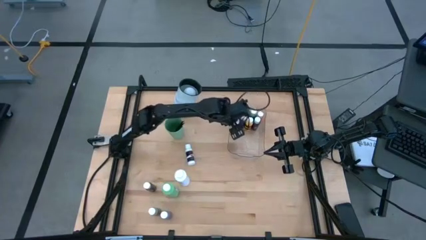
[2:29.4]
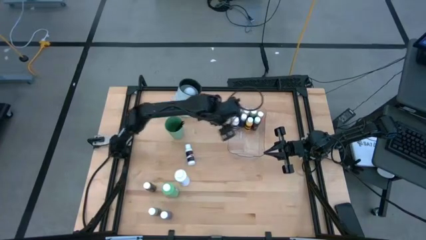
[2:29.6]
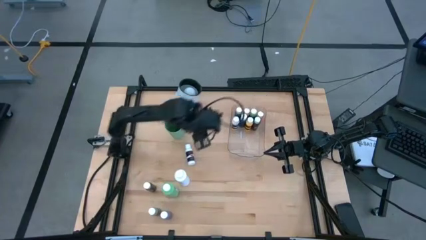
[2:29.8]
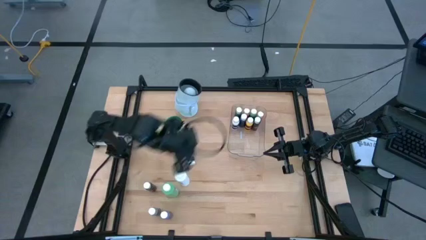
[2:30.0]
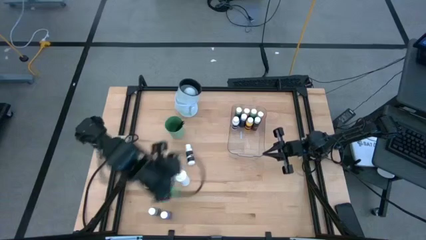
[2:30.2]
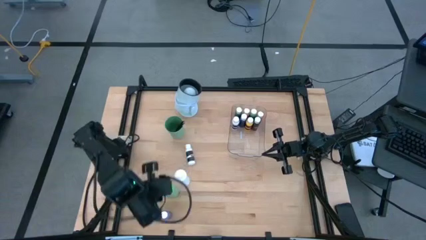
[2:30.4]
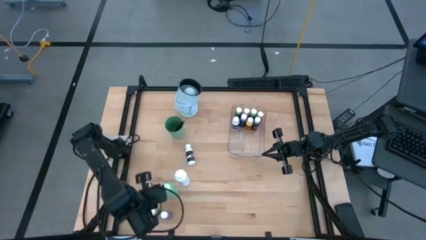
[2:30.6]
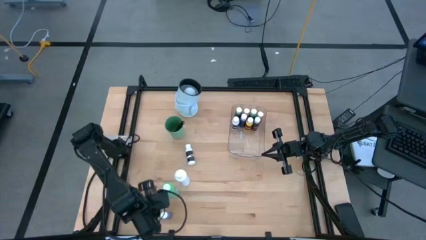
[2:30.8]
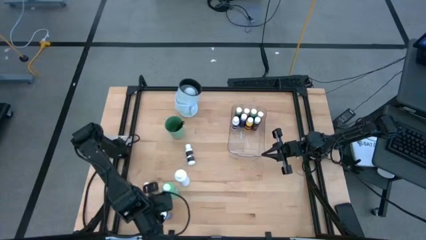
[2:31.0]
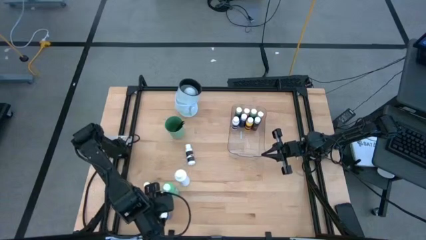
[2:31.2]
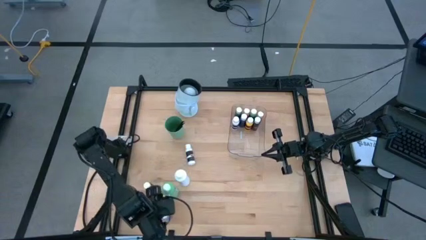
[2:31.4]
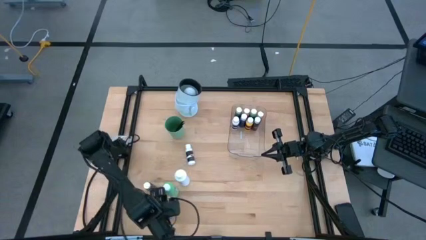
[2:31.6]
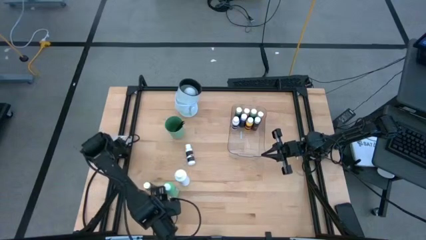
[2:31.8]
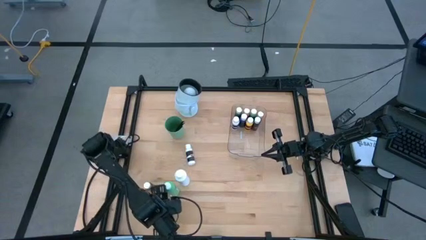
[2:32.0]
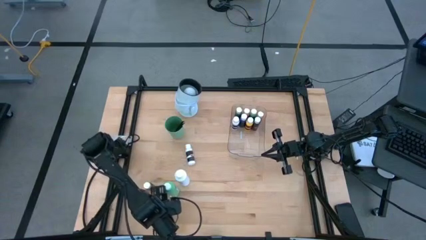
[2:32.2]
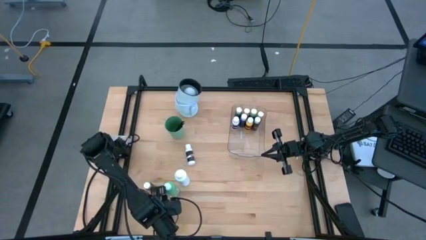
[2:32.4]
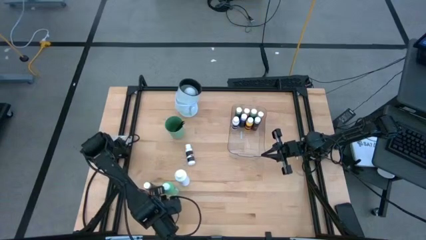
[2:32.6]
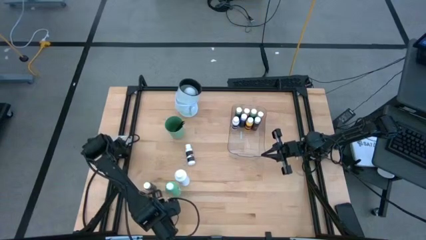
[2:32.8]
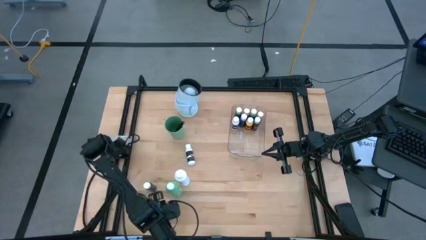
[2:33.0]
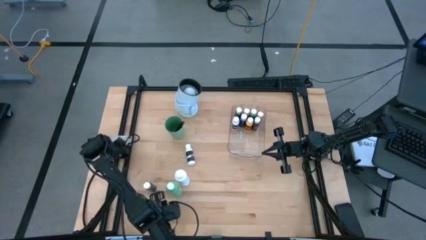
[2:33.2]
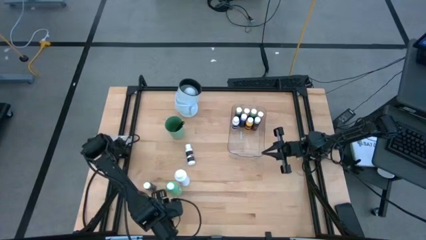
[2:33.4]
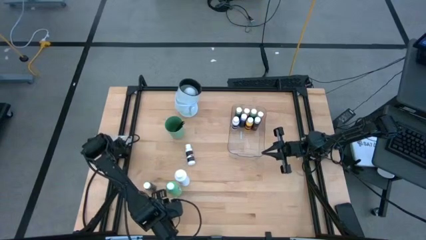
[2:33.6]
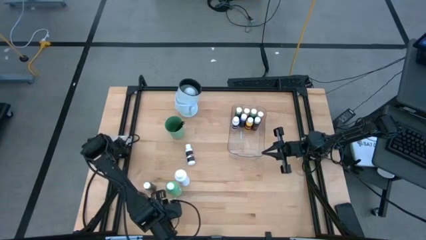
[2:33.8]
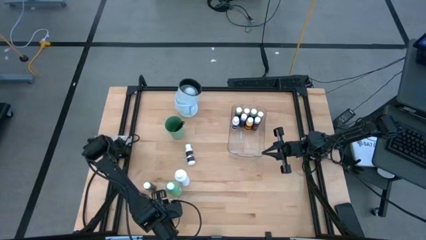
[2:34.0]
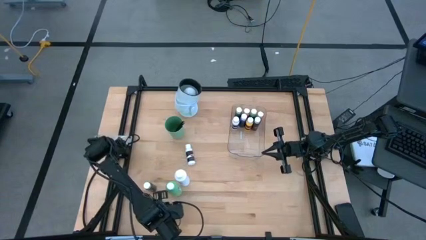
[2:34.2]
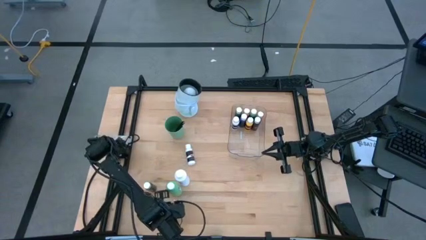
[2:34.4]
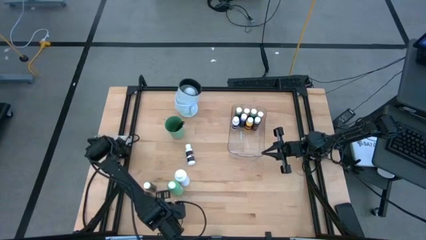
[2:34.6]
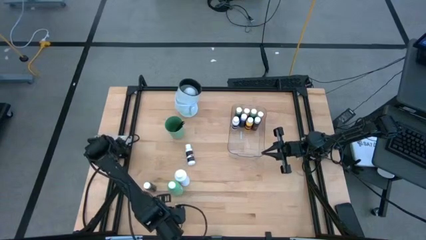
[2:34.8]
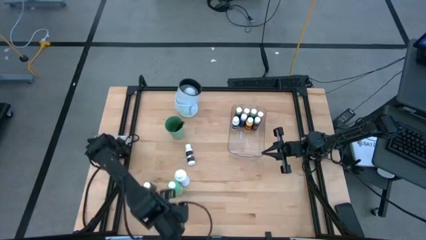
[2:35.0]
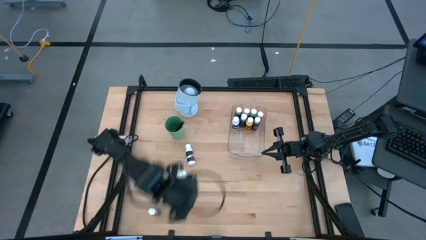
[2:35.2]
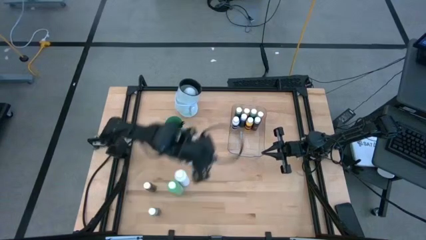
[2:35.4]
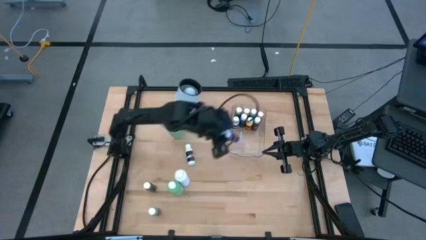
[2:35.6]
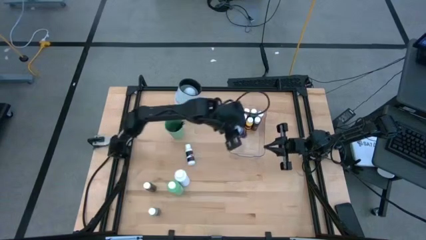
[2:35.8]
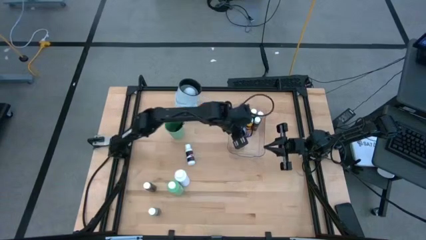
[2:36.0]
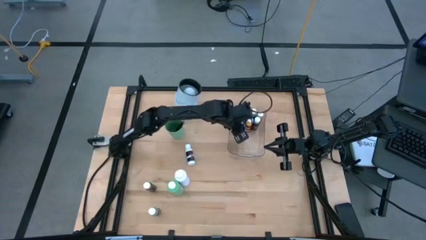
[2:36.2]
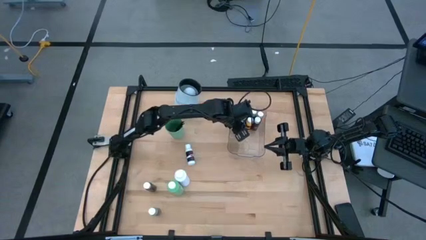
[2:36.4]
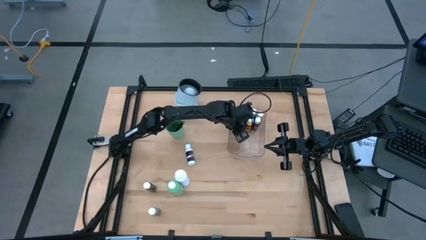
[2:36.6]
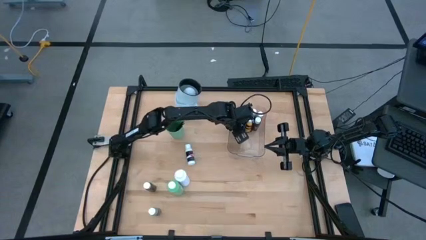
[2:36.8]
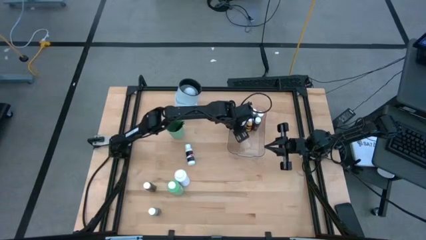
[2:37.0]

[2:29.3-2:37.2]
Task: Pick & Place Paint Supplies
Put the purple paint bottle into the transparent bin

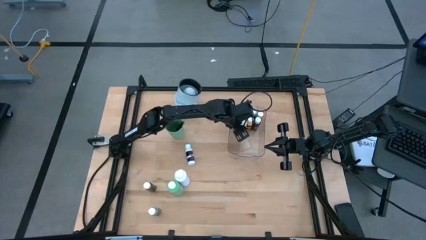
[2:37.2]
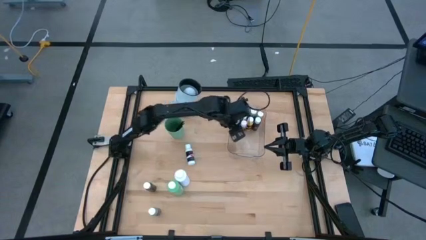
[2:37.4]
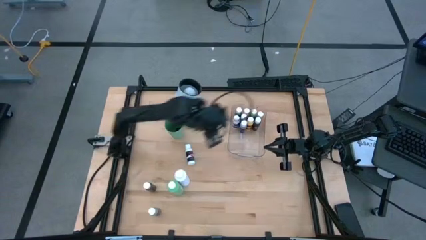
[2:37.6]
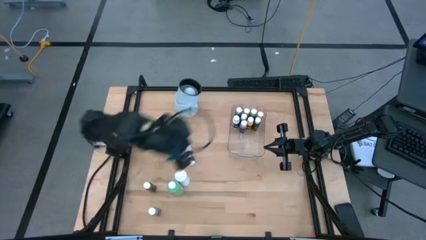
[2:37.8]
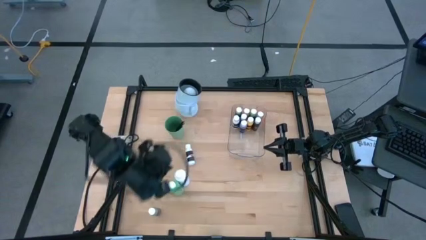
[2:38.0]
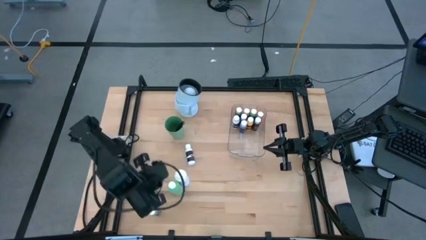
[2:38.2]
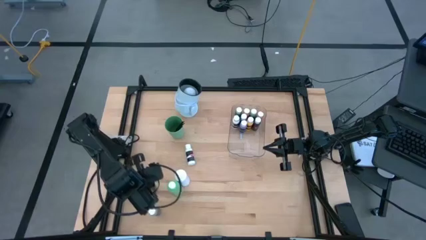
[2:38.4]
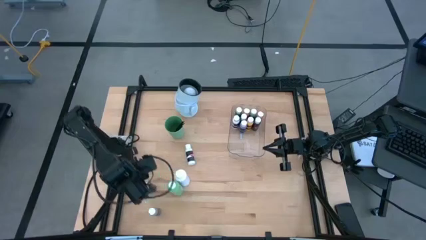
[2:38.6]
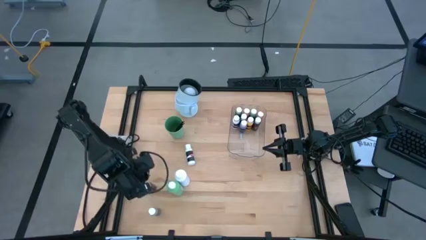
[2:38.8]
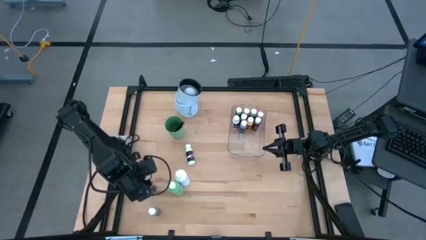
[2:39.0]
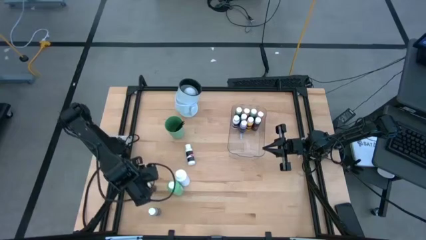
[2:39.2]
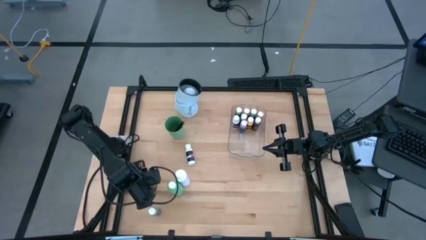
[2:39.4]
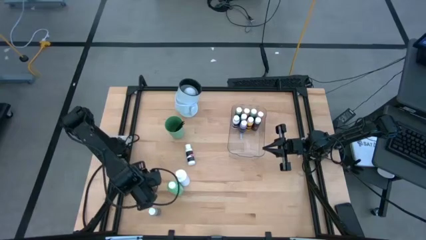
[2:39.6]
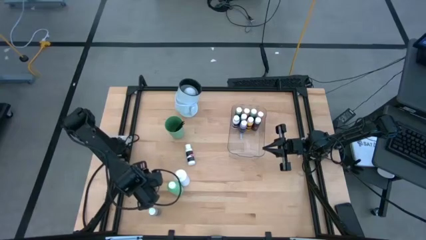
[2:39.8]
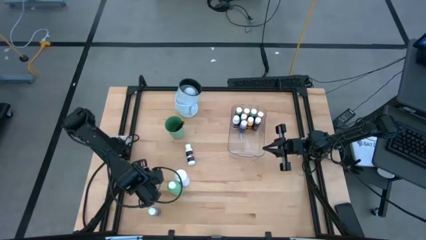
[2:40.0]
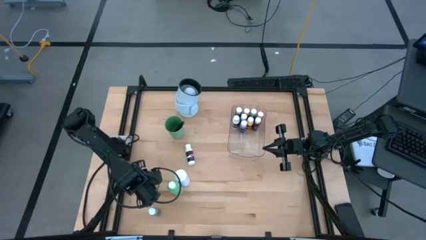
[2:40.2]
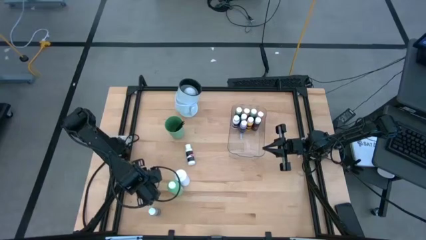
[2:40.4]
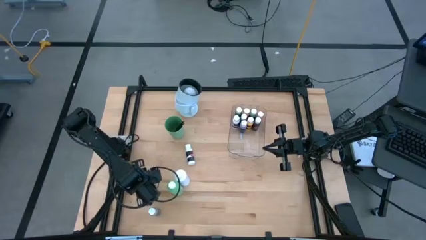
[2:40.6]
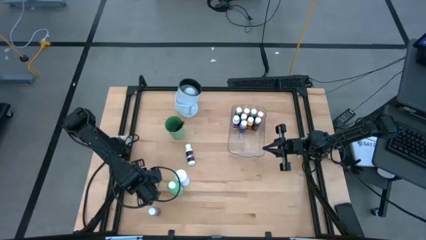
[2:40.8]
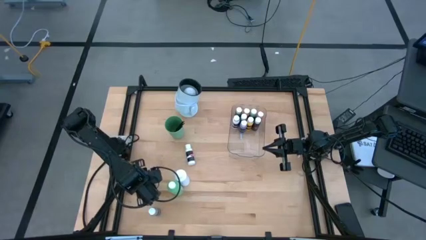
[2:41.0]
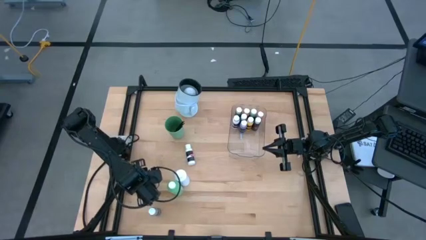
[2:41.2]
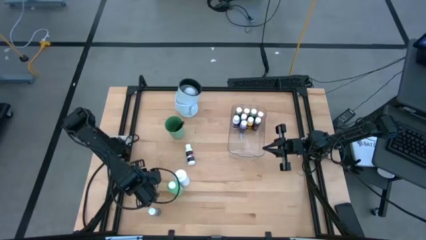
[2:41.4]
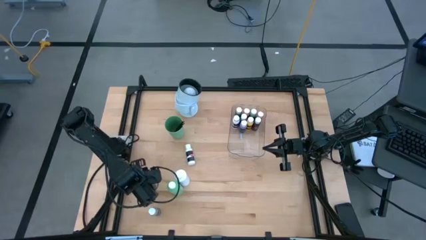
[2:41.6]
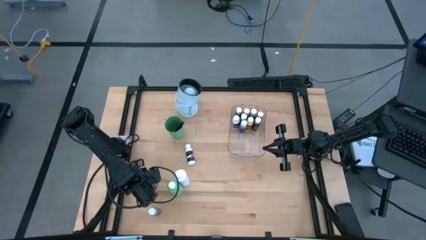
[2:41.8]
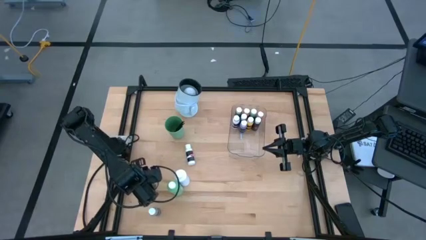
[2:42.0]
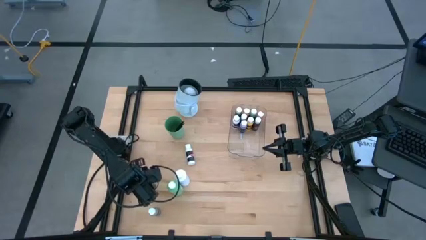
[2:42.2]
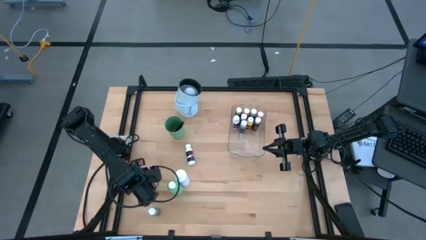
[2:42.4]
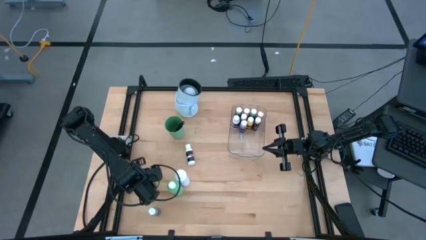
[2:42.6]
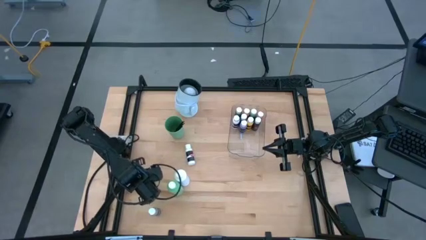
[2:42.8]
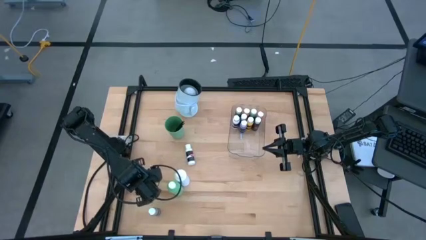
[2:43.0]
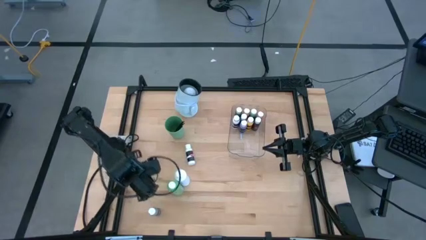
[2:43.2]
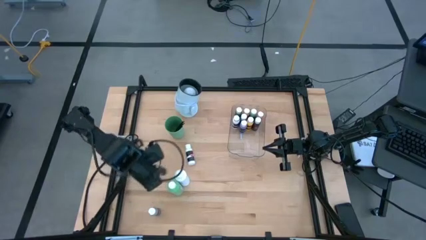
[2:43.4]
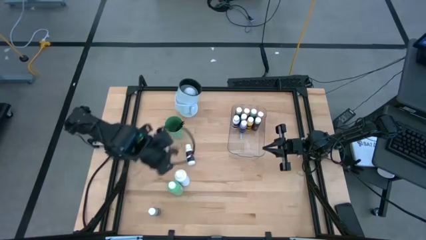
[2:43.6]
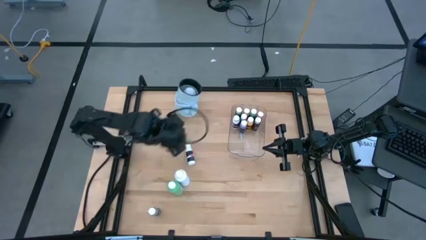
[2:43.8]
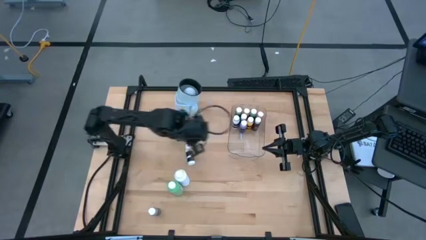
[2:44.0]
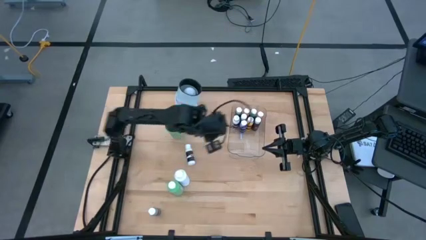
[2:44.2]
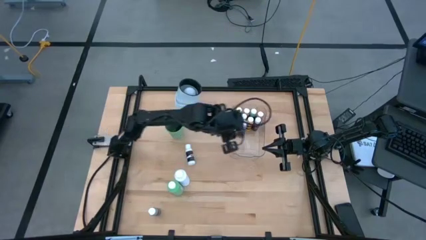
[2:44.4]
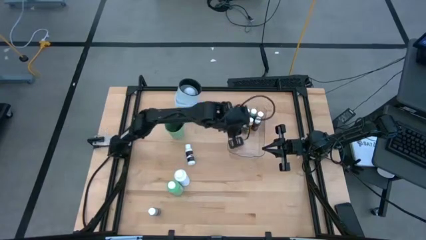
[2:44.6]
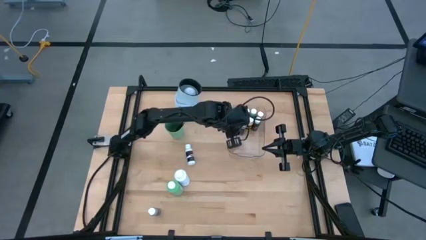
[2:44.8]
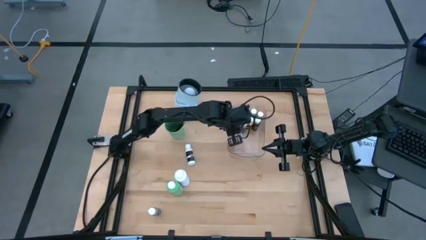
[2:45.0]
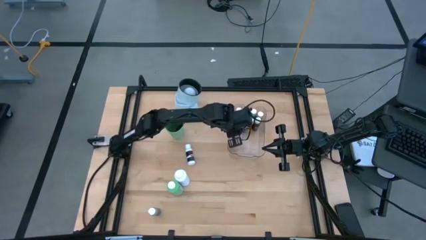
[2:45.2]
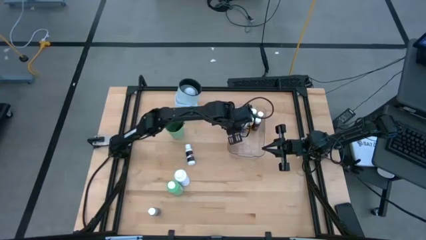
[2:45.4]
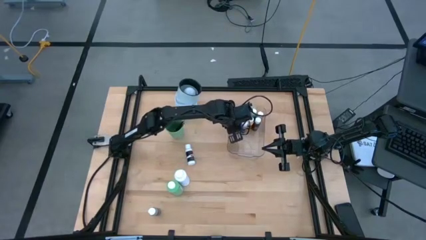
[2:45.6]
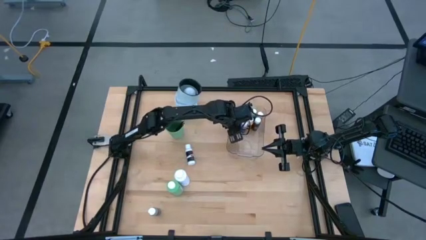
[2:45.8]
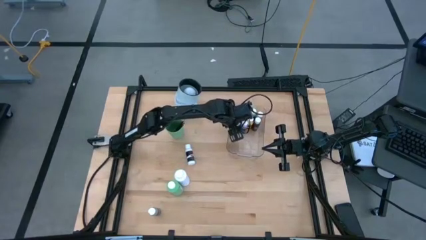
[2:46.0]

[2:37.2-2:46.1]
Put the brown paint bottle into the transparent bin
